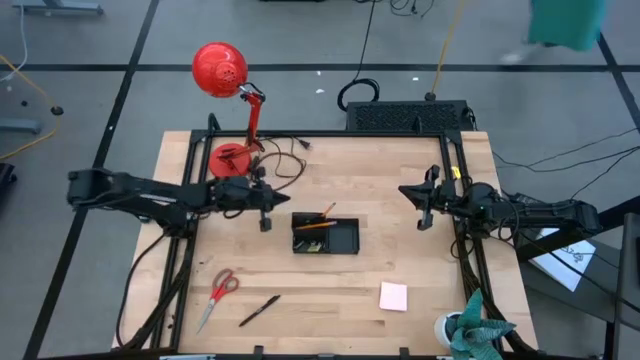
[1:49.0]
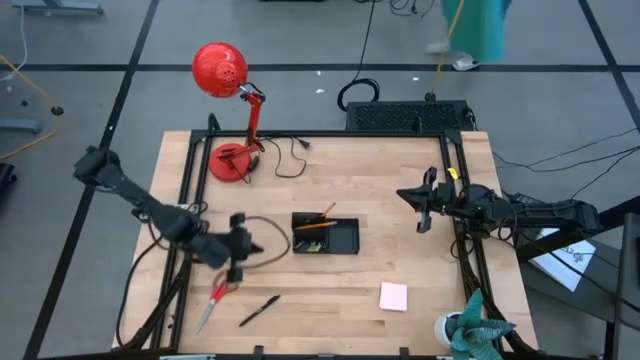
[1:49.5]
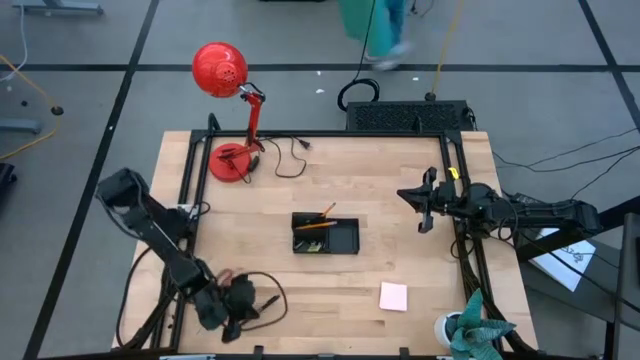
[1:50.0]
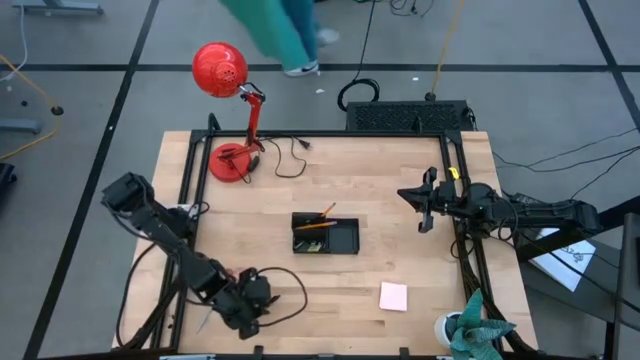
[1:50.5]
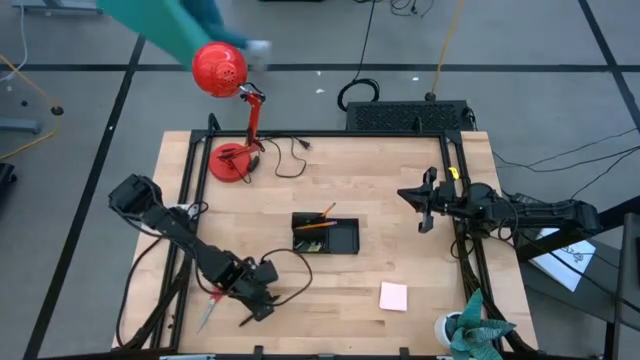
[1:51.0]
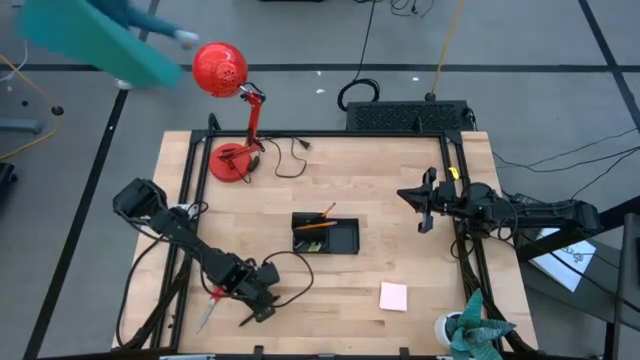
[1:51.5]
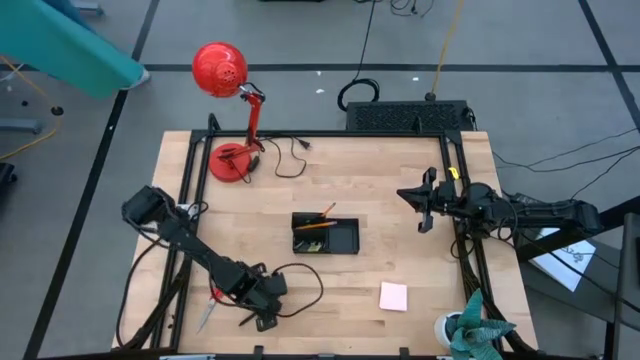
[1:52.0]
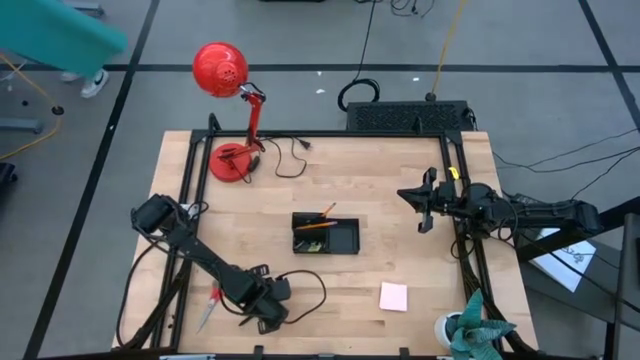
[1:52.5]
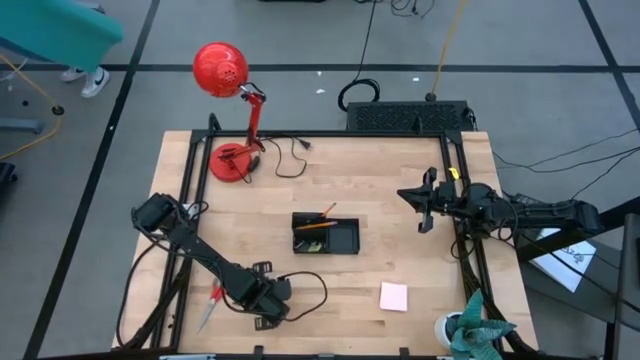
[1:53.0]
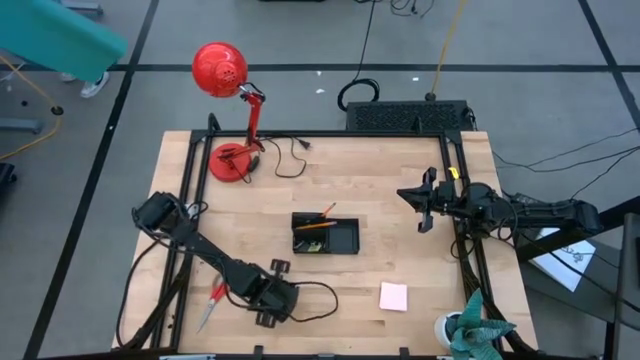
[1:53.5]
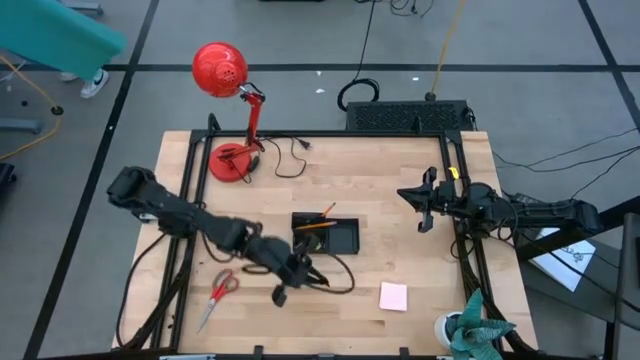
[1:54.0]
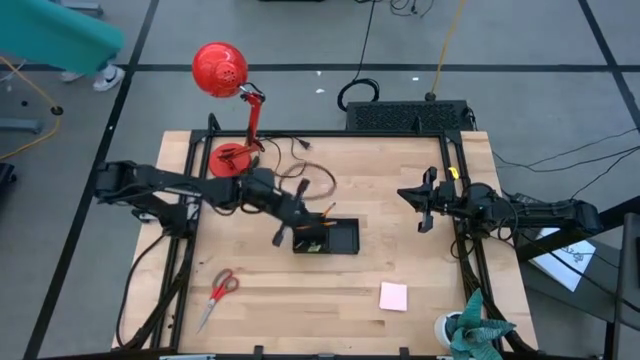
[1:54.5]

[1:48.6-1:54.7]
Task: Pick and place office supplies into organizer
Put the pen into the top left section of the desk organizer

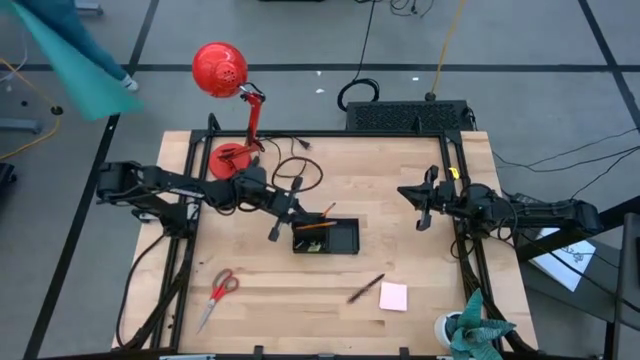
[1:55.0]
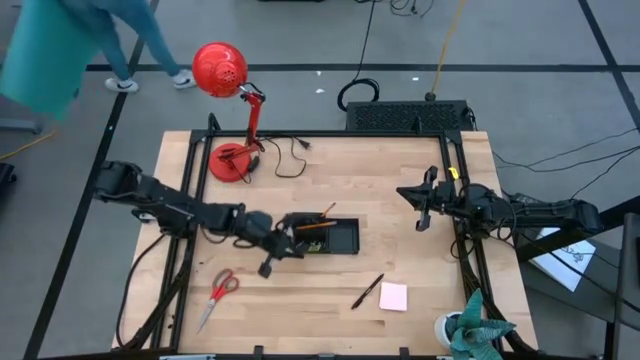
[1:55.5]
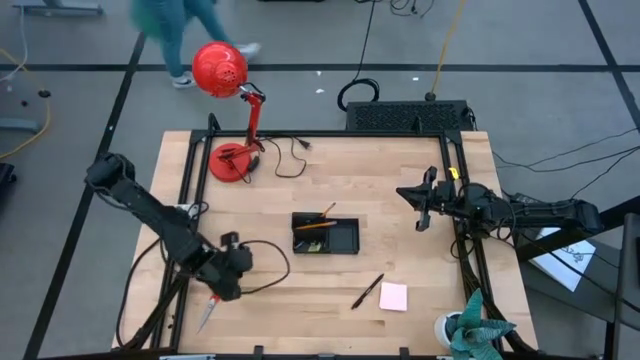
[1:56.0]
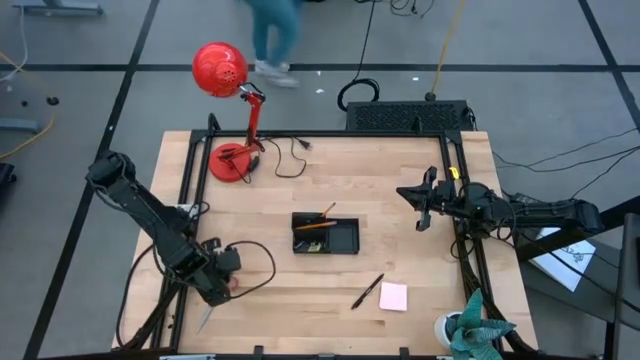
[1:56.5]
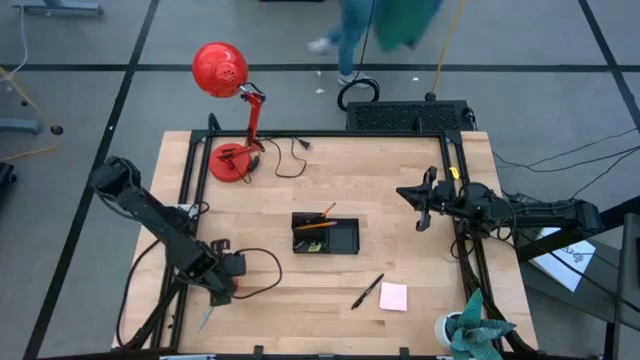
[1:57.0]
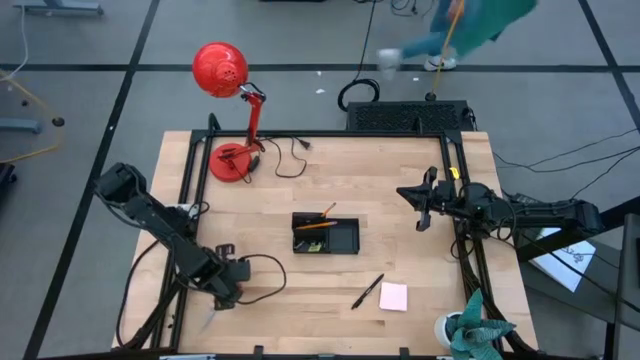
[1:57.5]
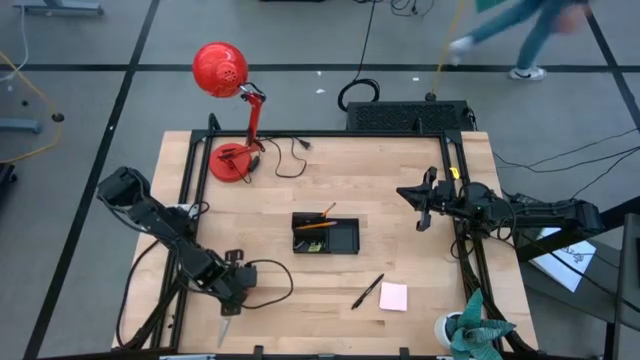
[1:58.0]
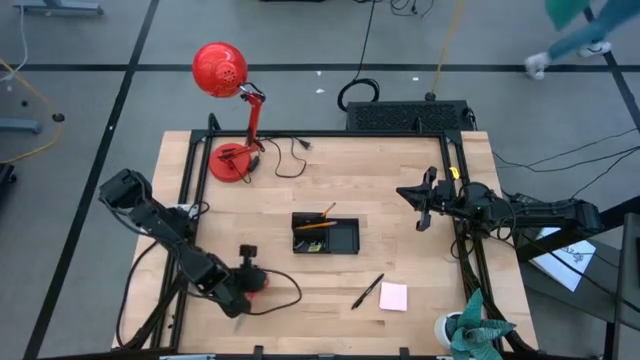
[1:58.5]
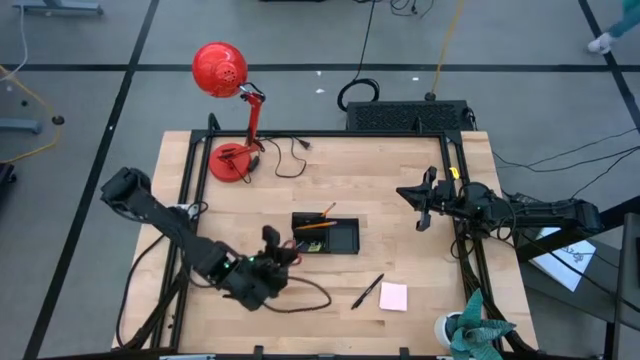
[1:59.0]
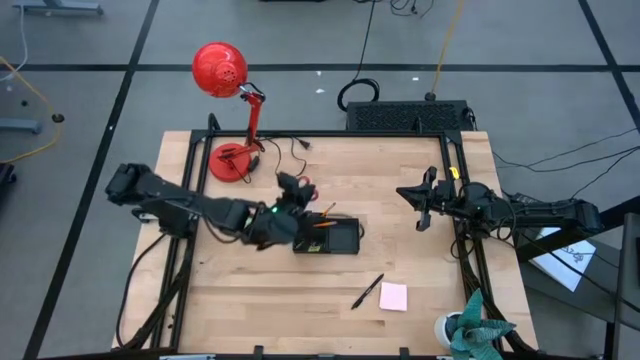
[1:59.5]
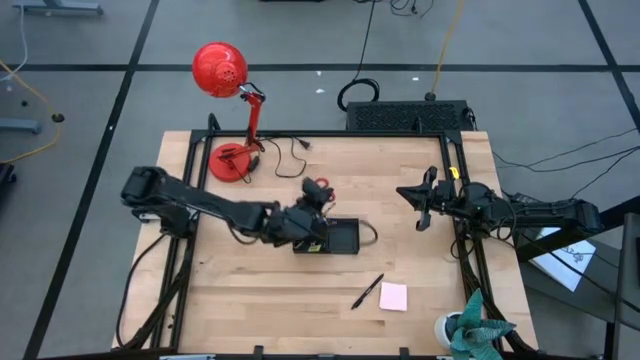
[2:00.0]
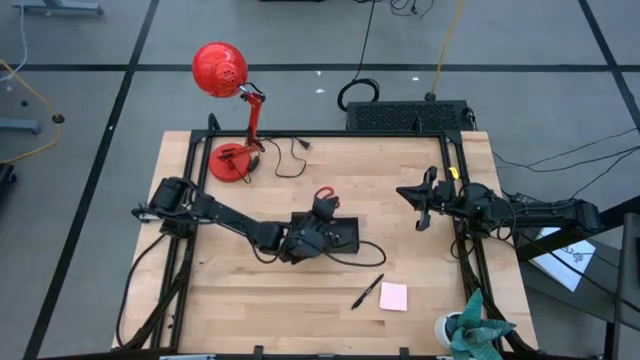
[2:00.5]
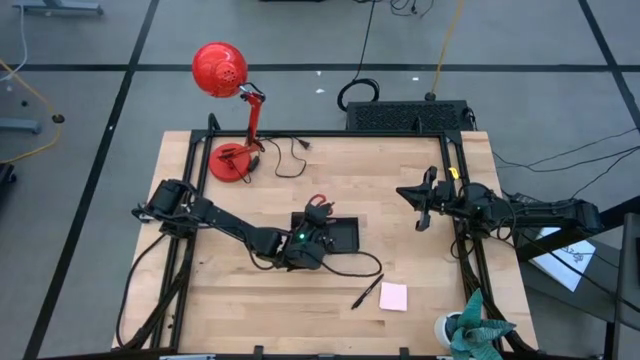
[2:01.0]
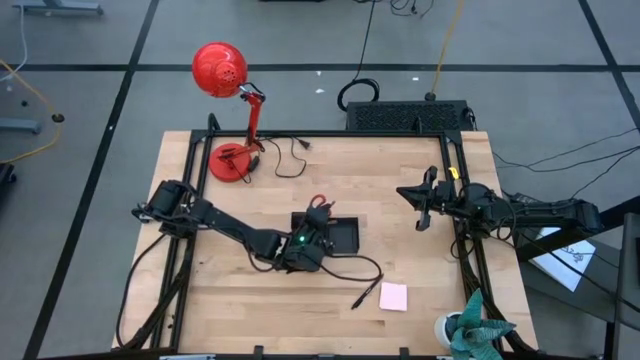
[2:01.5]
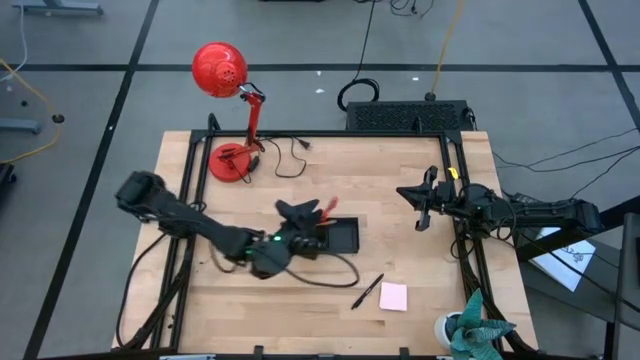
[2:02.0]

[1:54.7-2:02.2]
Put the scissors into the top left section of the desk organizer

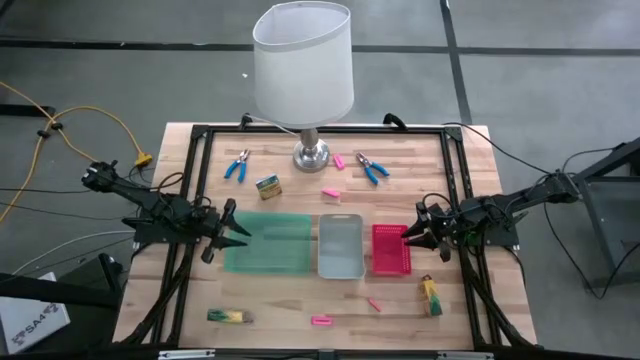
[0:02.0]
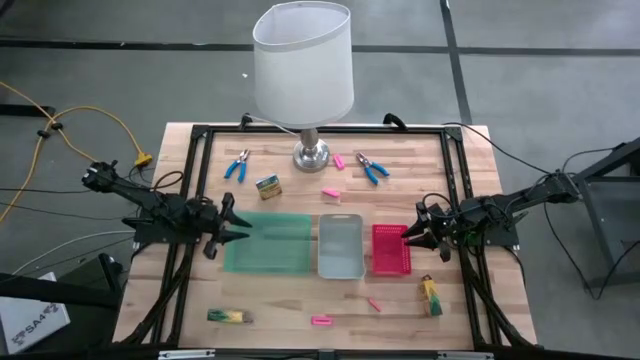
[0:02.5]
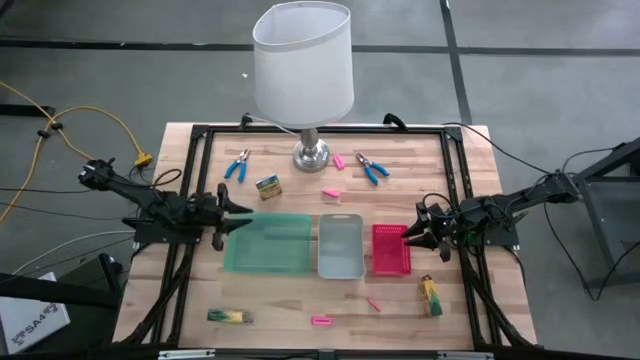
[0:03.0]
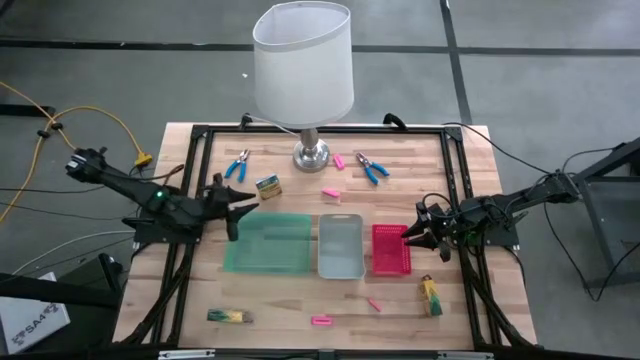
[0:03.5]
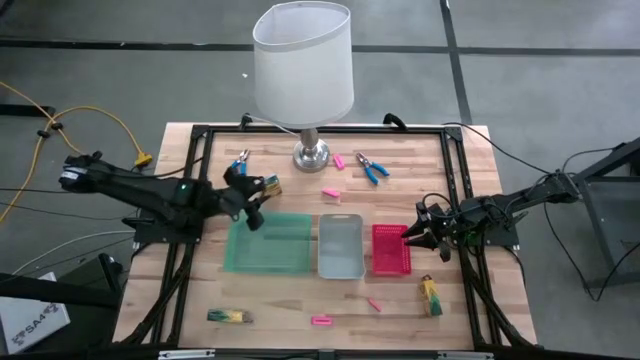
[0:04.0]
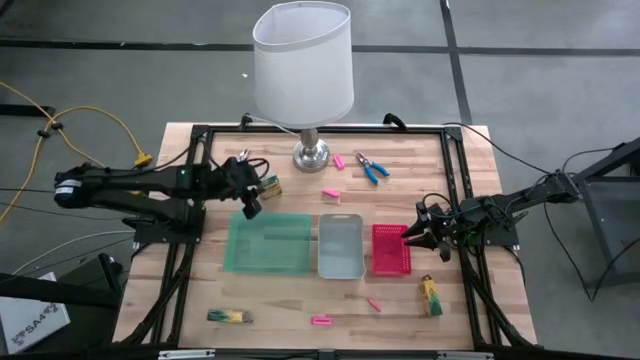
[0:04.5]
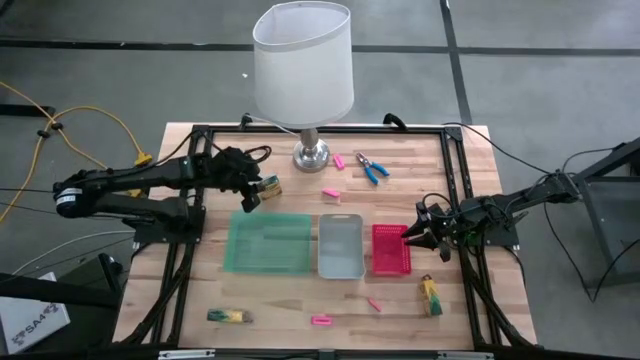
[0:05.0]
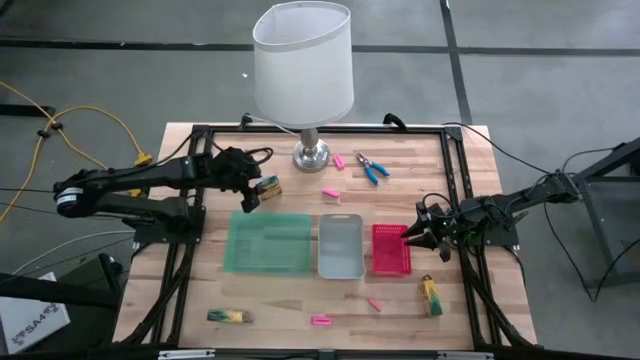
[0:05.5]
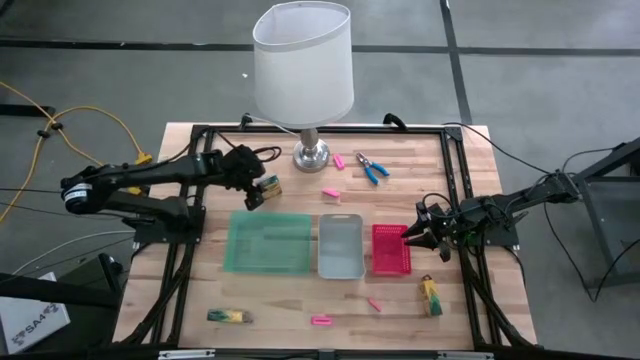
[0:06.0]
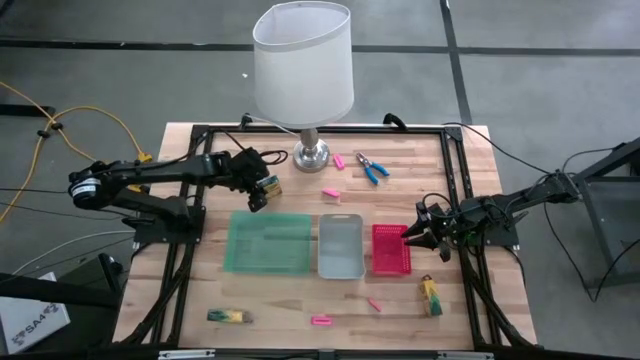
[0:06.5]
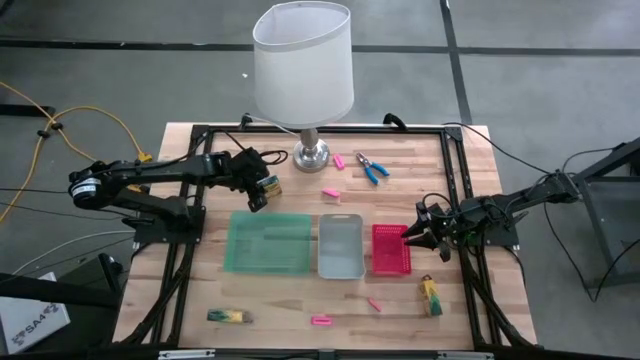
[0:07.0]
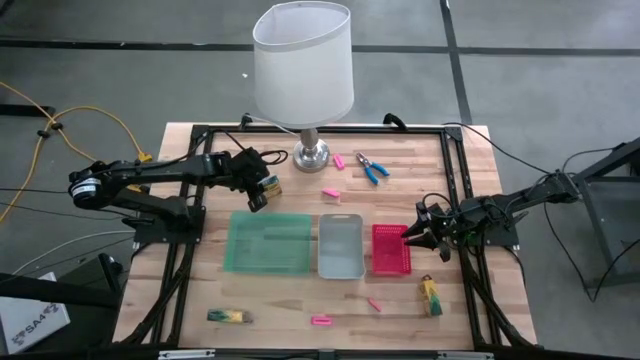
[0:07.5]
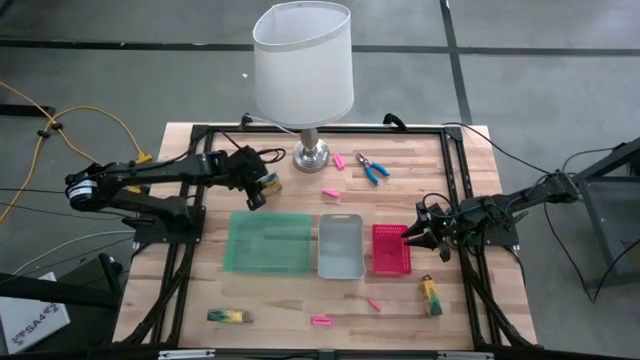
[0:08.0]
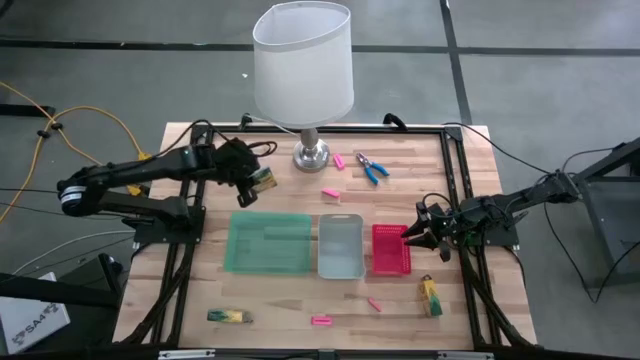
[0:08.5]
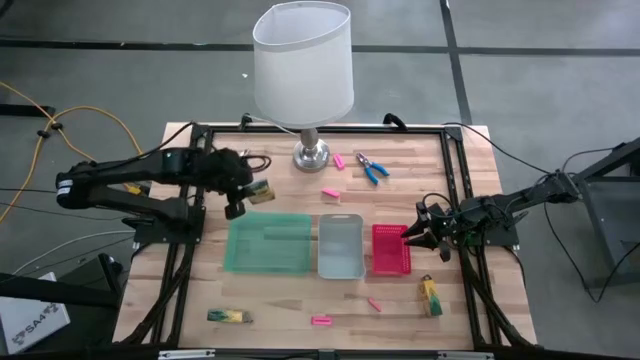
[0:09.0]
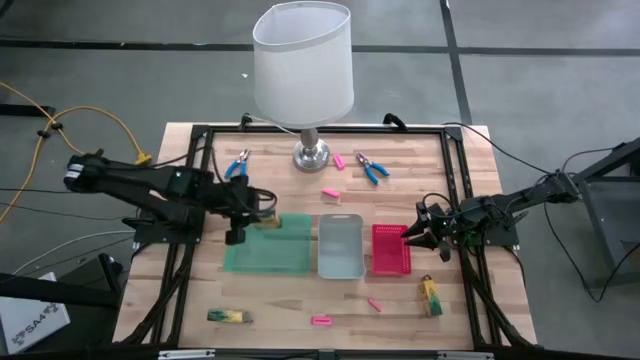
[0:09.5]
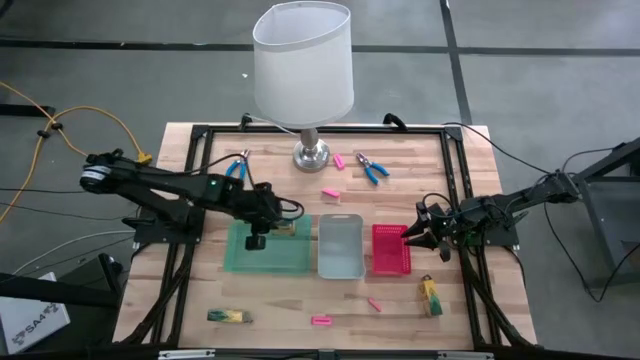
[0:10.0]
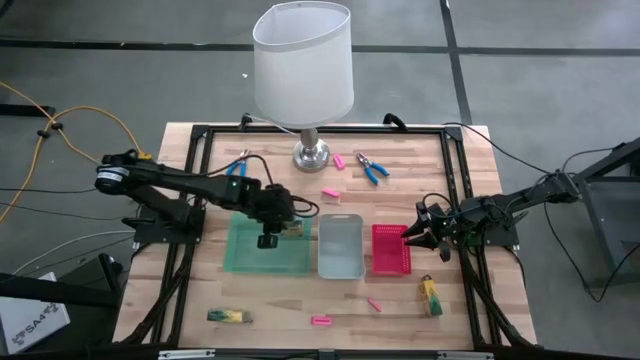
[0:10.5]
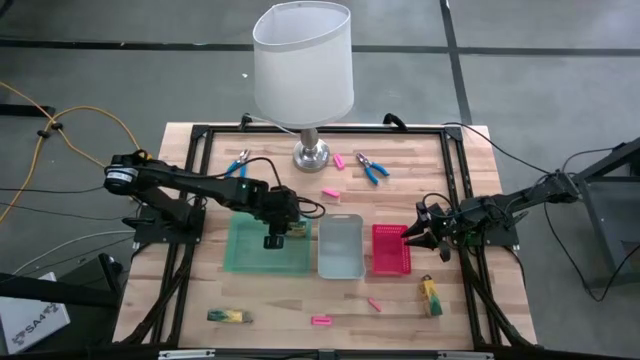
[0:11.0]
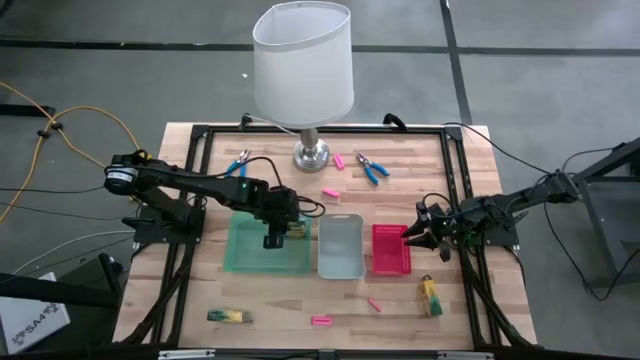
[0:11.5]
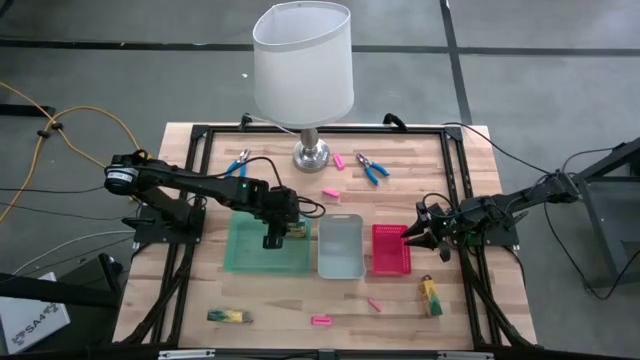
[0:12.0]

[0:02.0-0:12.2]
Task: Pick & Place School Supplies
Put the yellow box of crayons into the green bin
